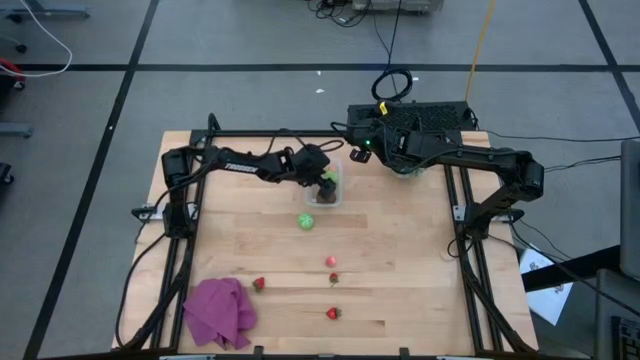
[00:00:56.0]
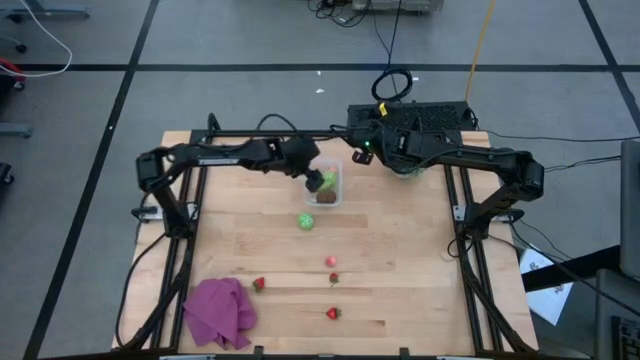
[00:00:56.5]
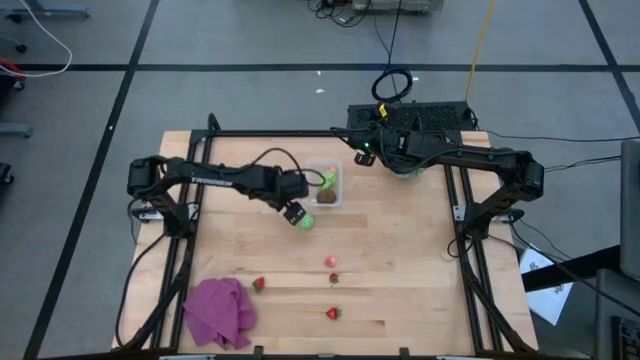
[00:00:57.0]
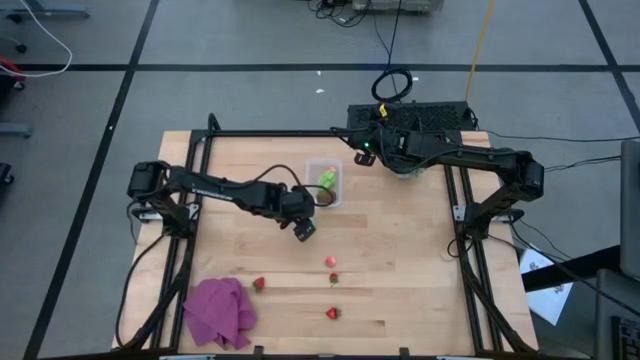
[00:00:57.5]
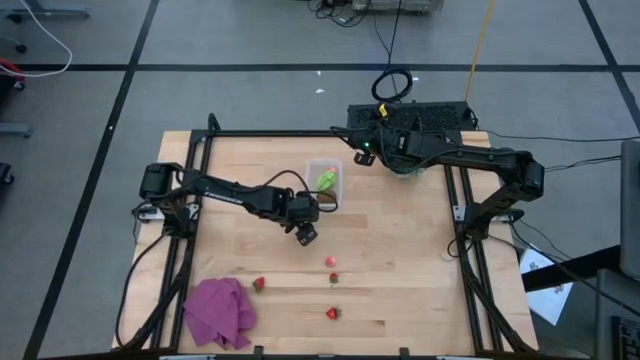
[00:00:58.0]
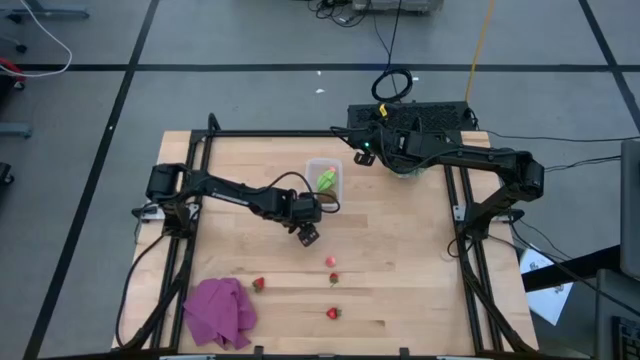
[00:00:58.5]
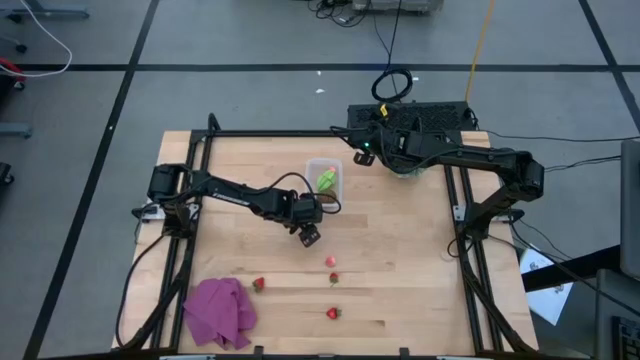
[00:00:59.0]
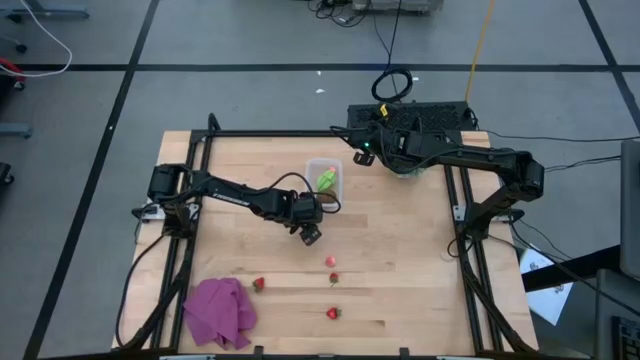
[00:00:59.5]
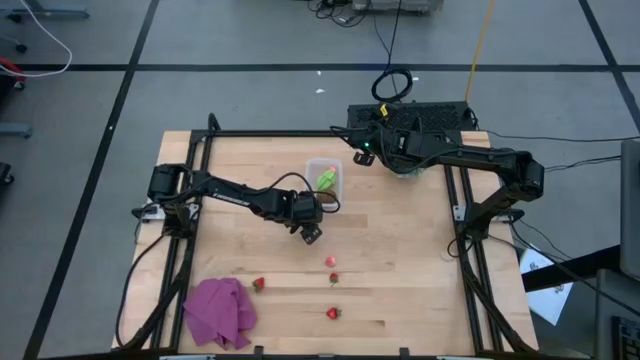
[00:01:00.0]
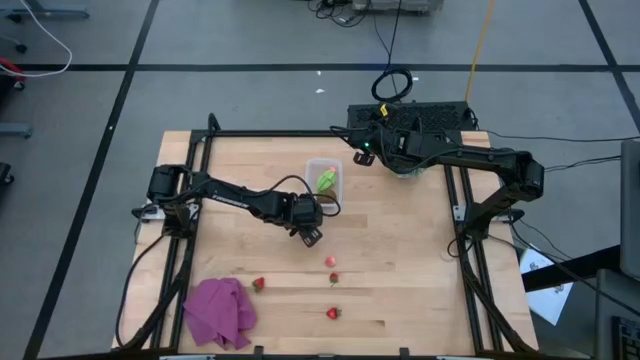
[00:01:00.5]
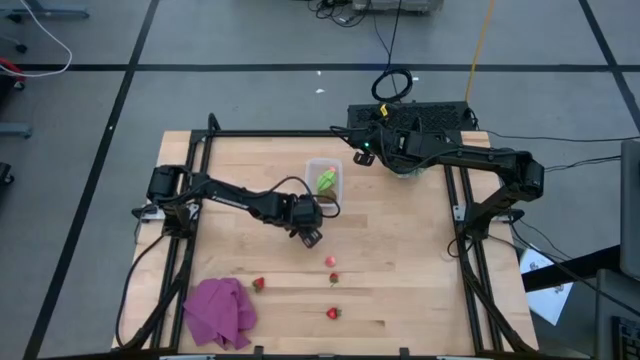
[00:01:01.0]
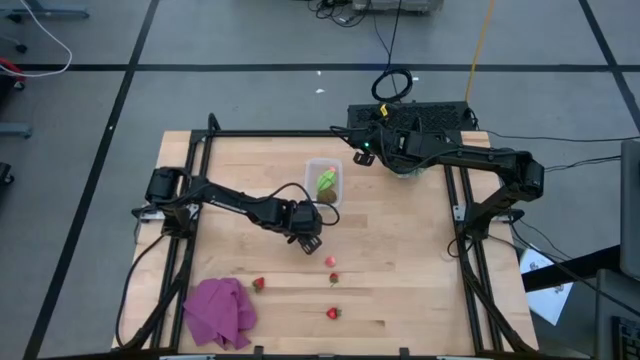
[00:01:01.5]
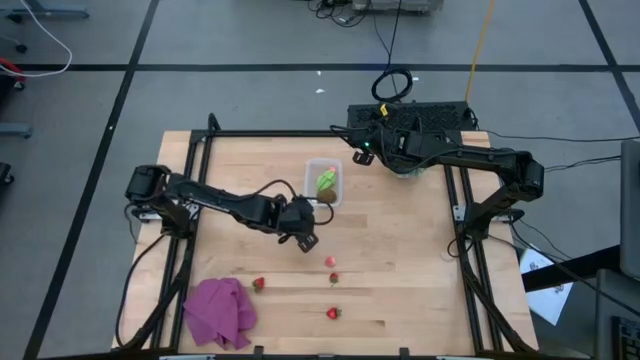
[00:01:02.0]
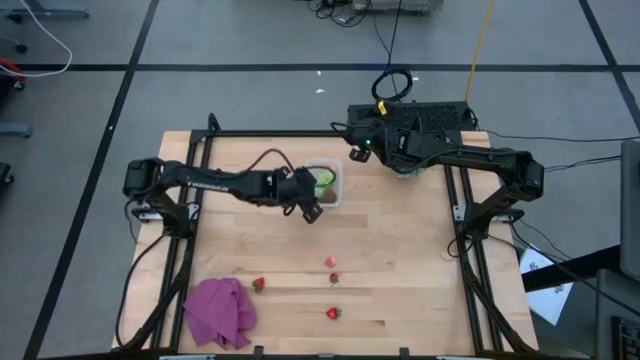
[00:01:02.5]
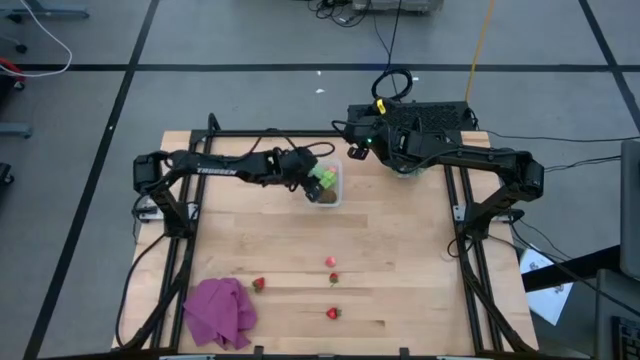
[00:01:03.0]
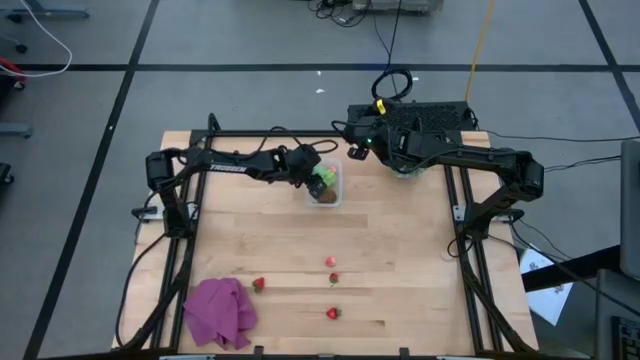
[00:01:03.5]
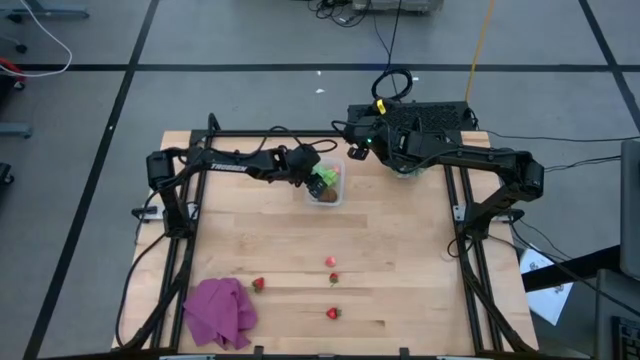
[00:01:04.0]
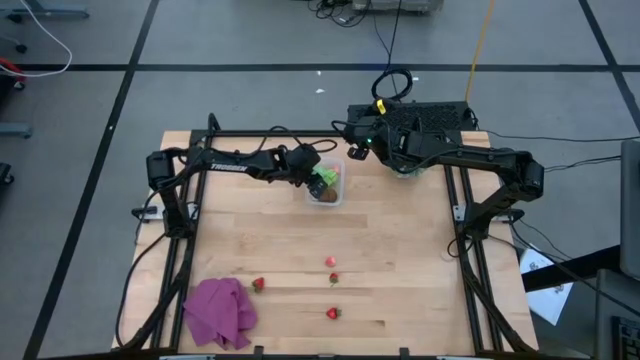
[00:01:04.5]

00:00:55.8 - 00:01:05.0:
Task: Pick and placing Produce into tupperware
Put the cabbage into the transparent bin

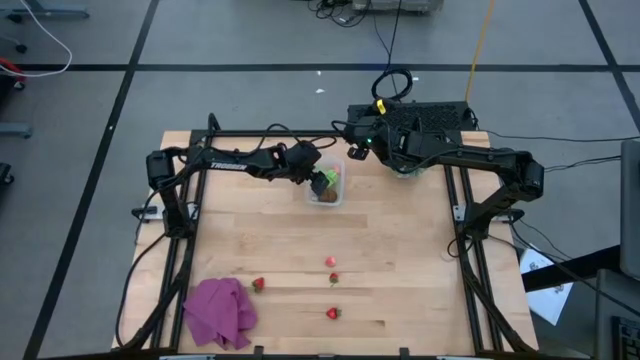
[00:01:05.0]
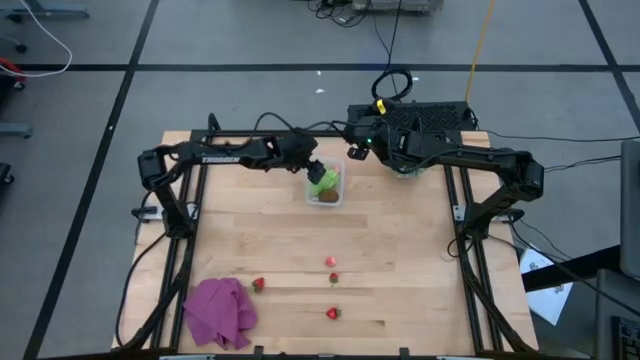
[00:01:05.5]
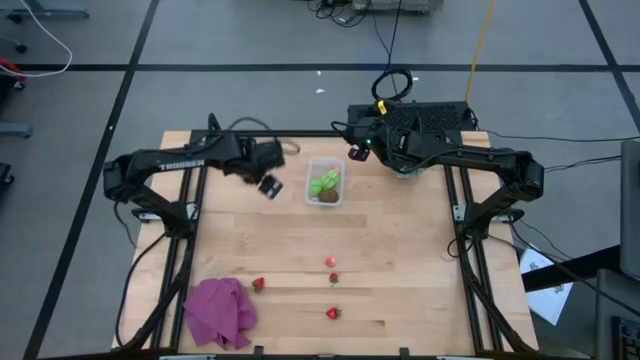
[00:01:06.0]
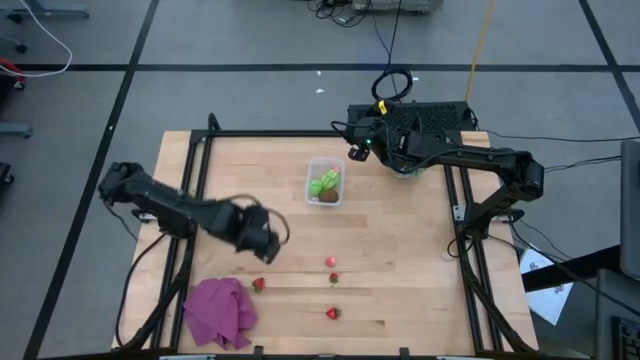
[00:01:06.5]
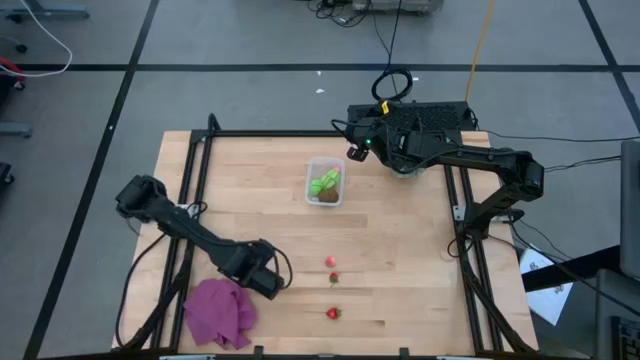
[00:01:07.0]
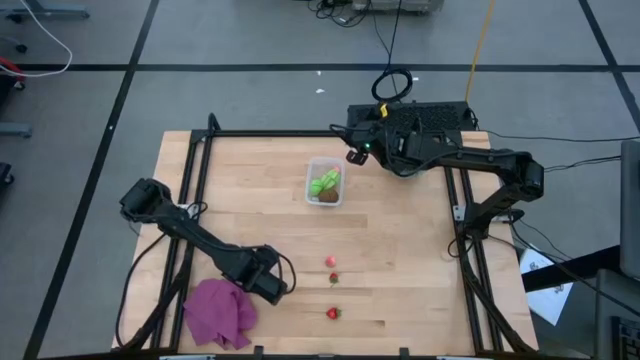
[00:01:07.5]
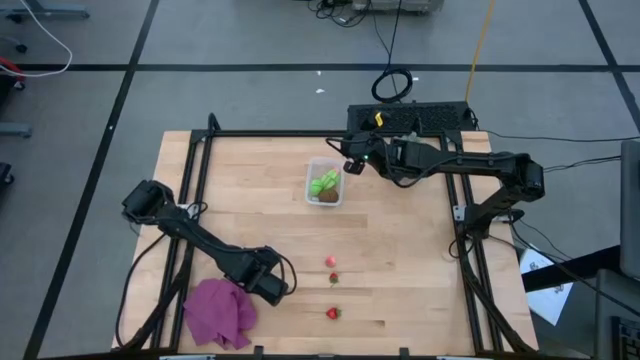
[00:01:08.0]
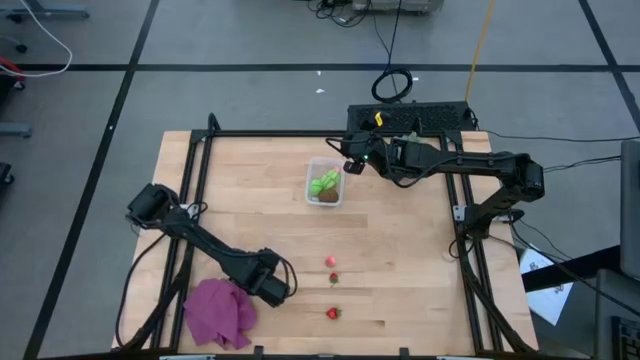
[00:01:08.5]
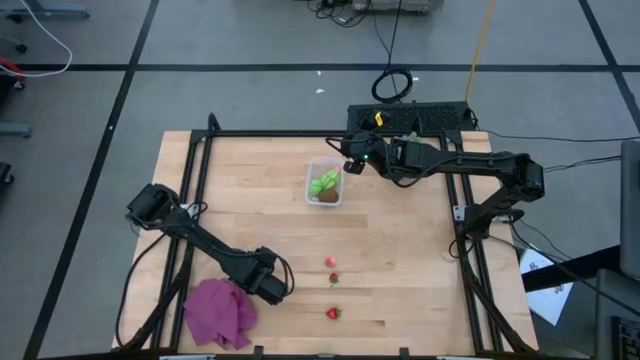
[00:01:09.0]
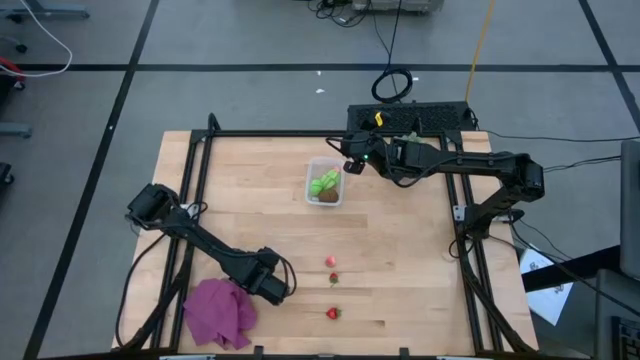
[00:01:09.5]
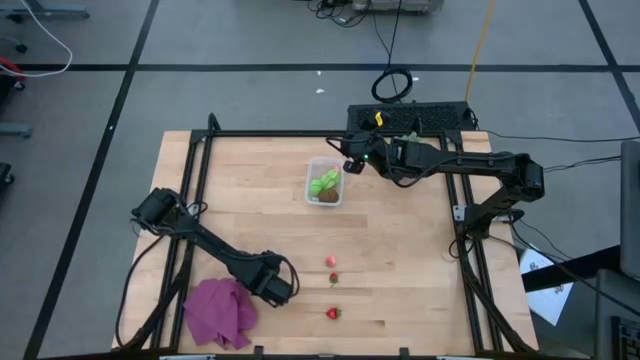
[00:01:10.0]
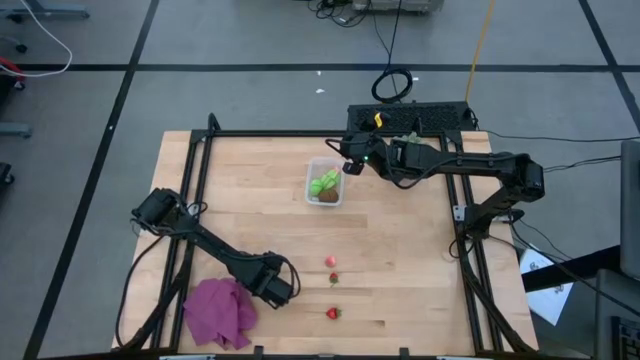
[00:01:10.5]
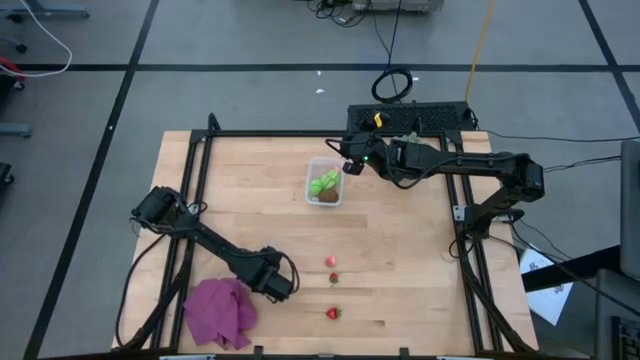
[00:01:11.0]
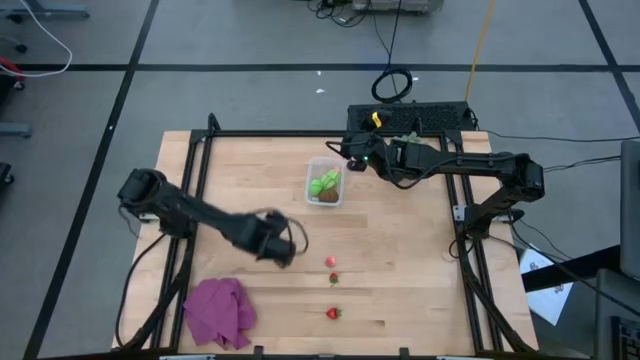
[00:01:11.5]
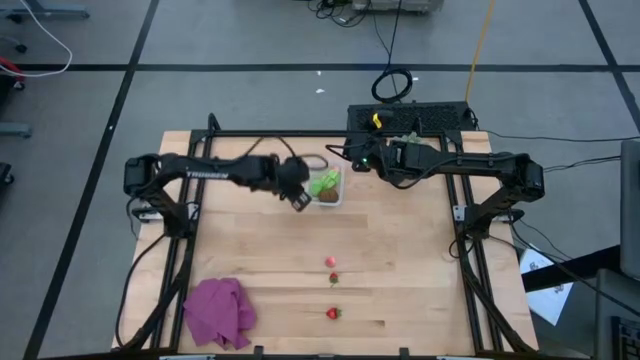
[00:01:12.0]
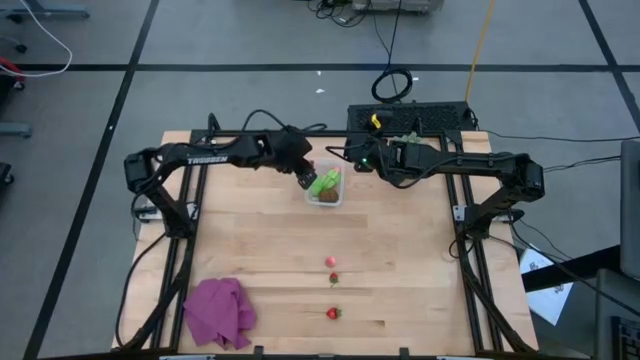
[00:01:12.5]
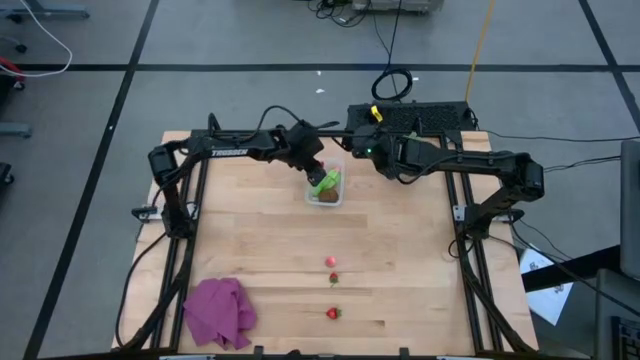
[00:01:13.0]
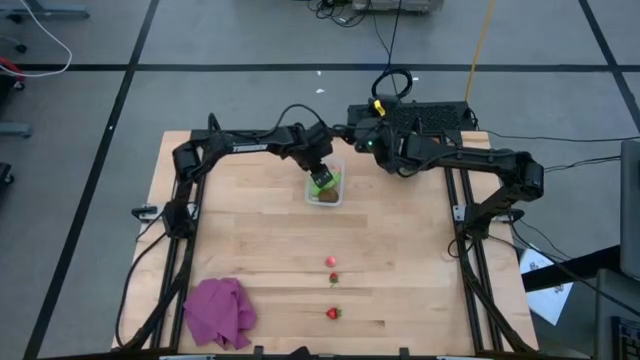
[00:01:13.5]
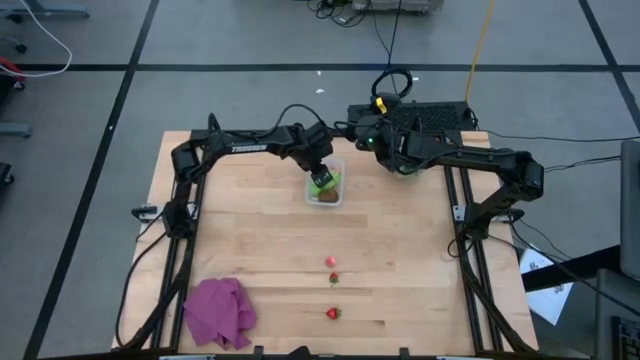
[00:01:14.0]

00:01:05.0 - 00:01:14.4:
Put the top left strawberry into the transparent bin

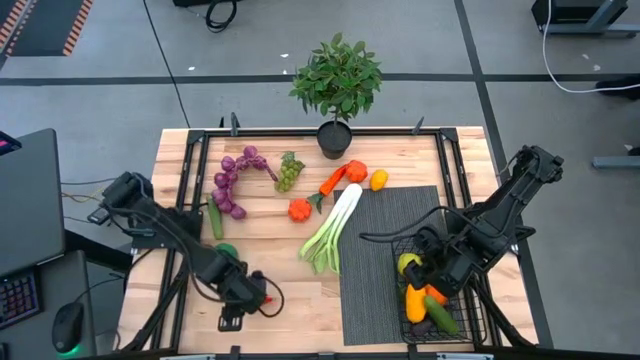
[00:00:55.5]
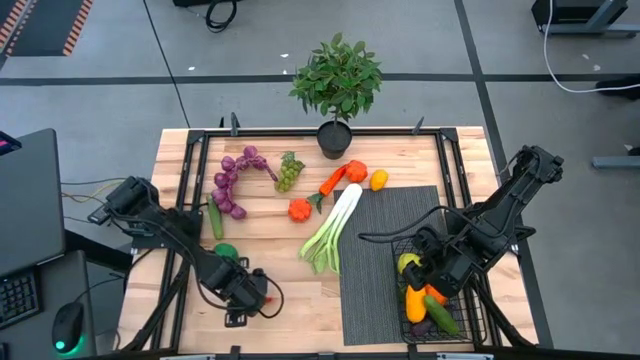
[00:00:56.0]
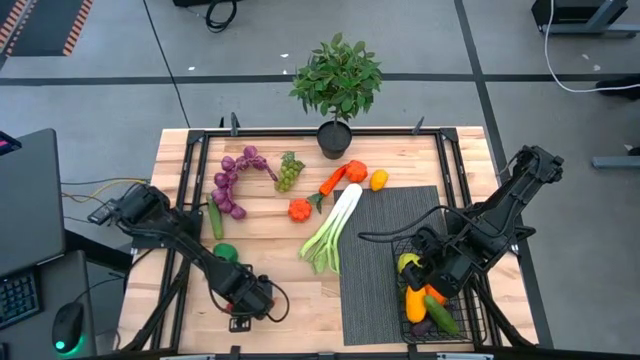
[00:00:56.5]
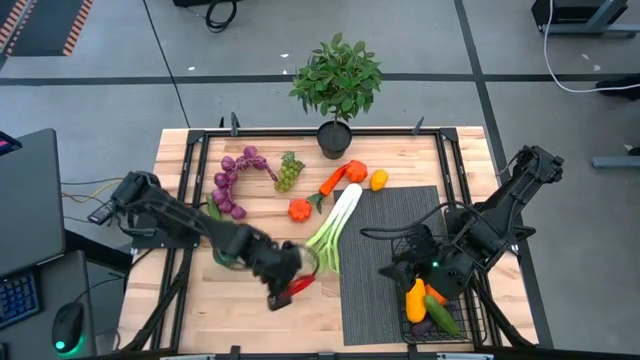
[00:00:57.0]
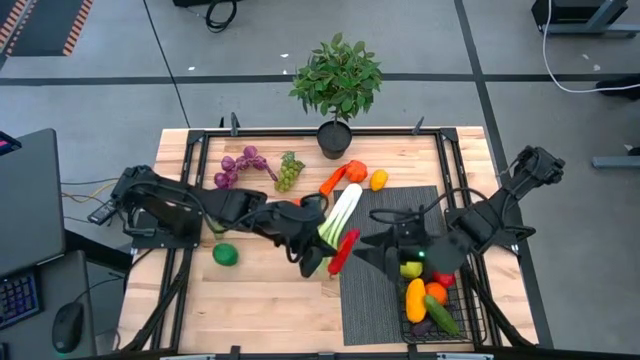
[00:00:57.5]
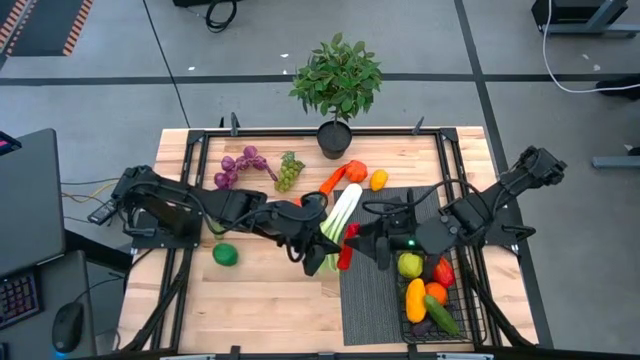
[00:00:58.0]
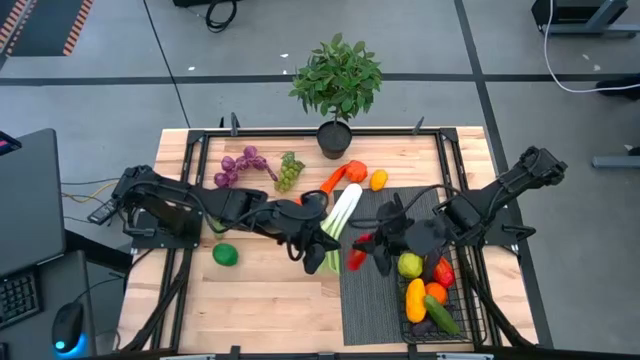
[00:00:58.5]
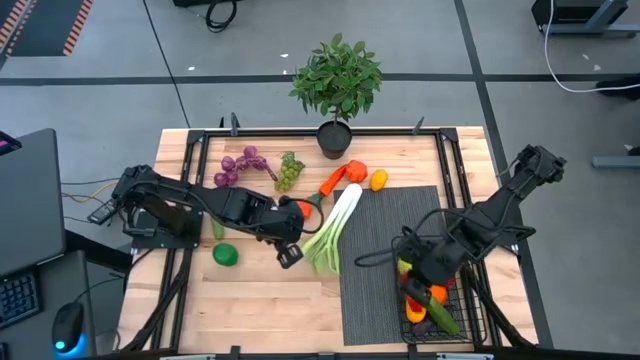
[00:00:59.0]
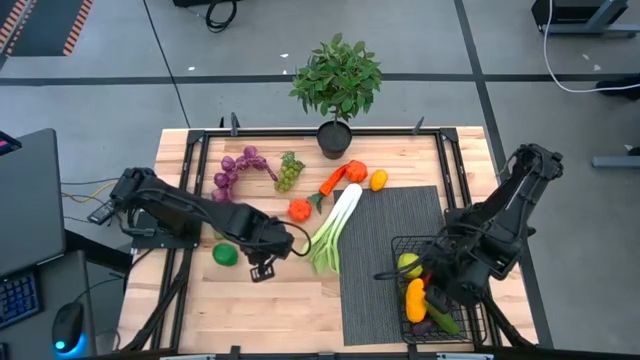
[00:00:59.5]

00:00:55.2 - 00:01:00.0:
Task: Build produce basket
Put the red chili pepper into the black wire basket
